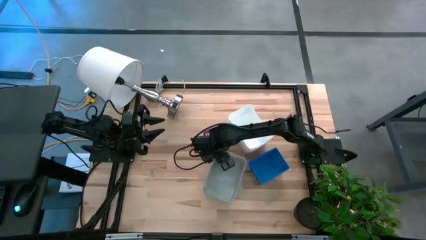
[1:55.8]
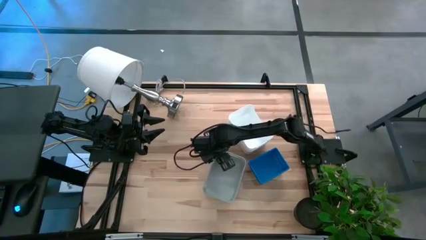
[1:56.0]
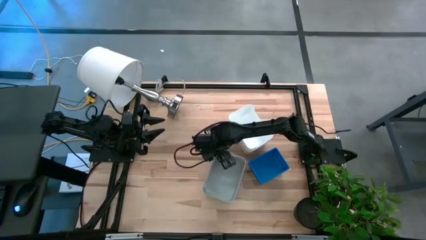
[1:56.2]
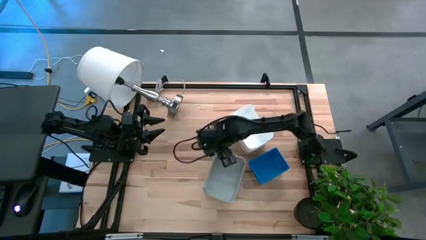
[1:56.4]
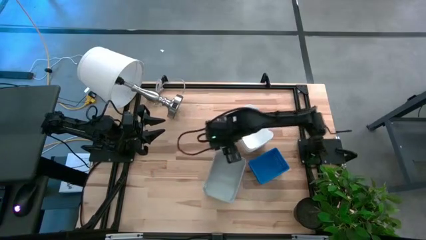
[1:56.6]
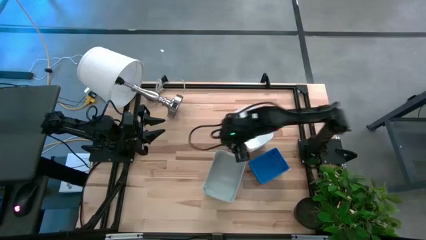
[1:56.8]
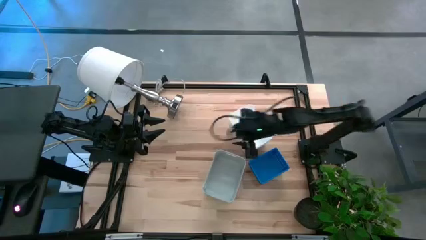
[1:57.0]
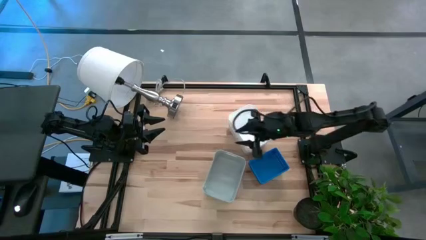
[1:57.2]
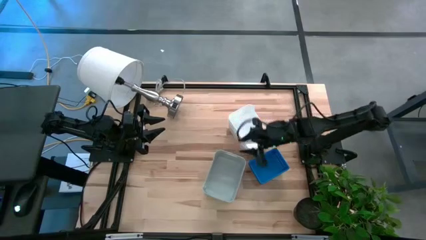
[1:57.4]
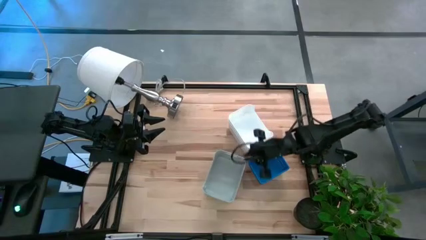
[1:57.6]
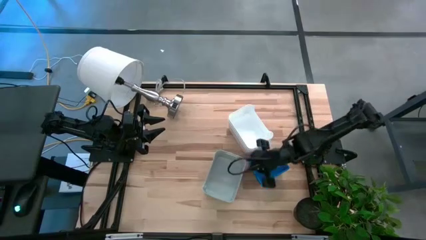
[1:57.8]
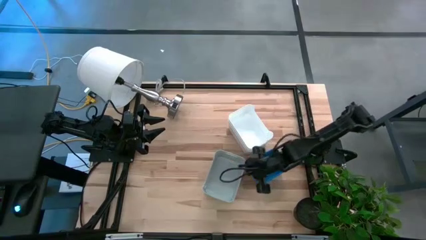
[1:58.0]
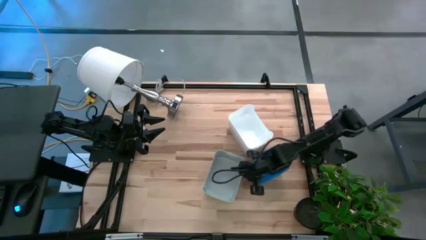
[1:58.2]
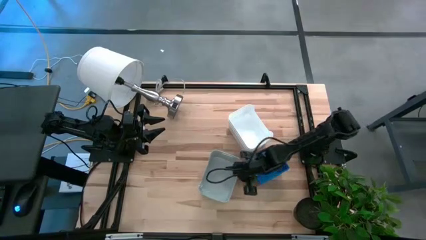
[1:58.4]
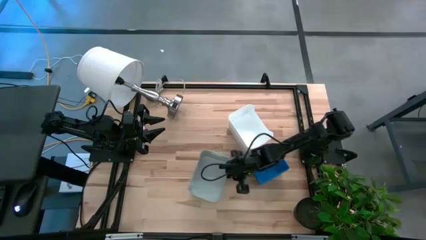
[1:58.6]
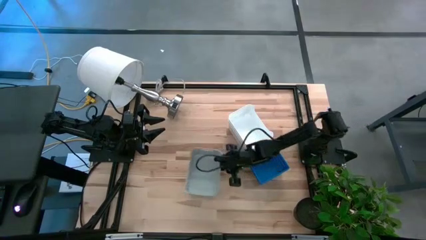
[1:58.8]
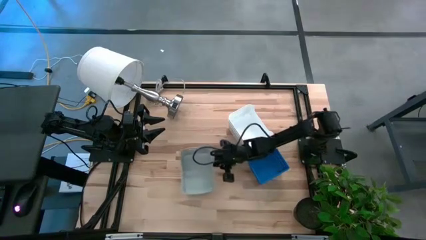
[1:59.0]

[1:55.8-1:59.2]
Adjust the stack of gray bins

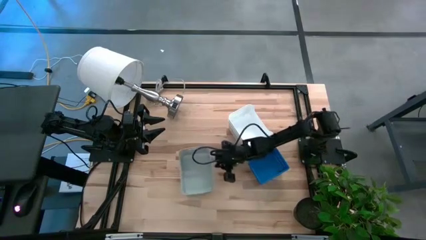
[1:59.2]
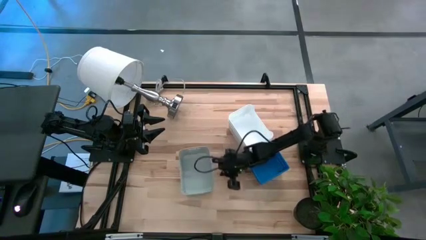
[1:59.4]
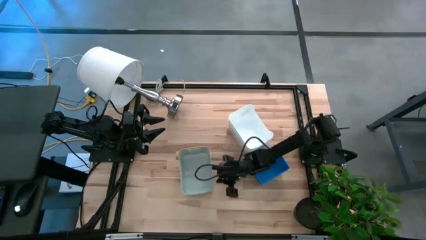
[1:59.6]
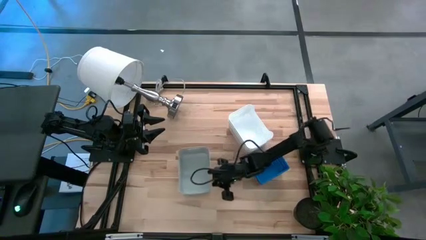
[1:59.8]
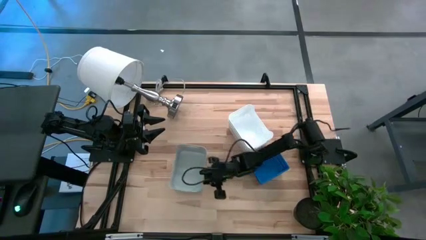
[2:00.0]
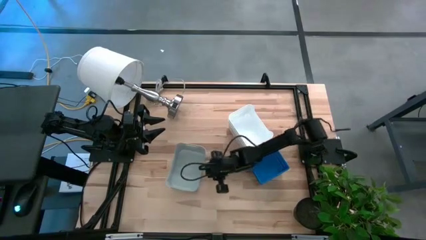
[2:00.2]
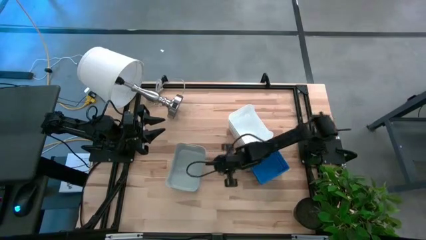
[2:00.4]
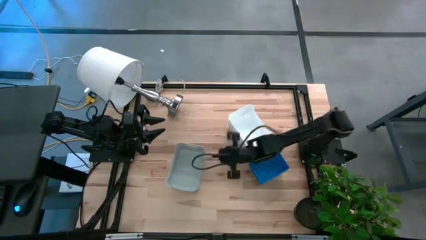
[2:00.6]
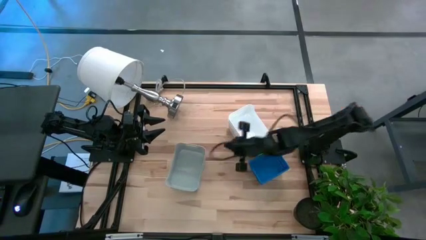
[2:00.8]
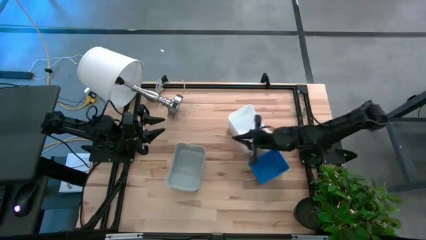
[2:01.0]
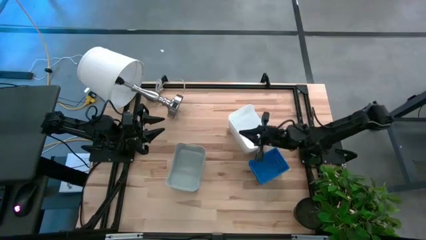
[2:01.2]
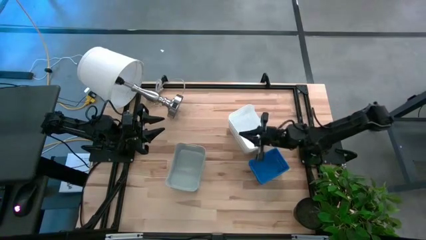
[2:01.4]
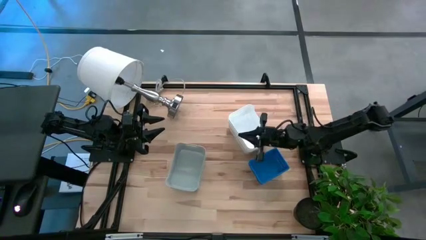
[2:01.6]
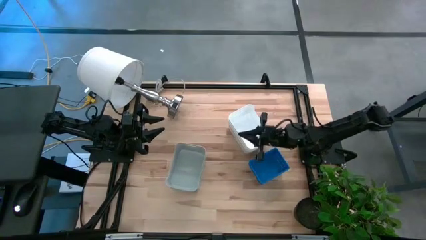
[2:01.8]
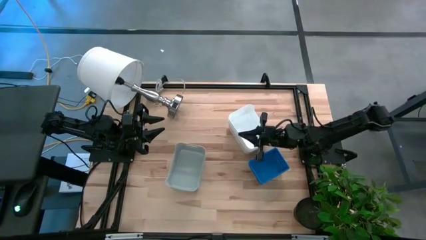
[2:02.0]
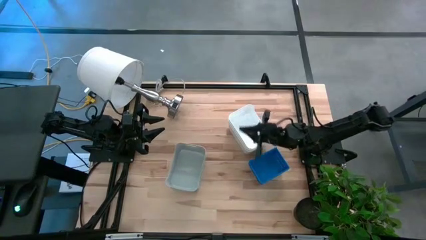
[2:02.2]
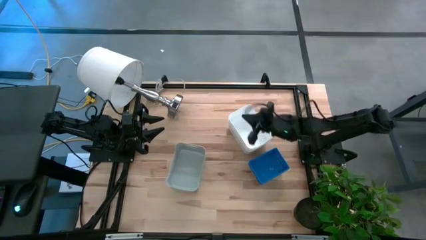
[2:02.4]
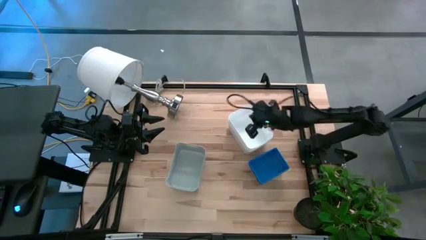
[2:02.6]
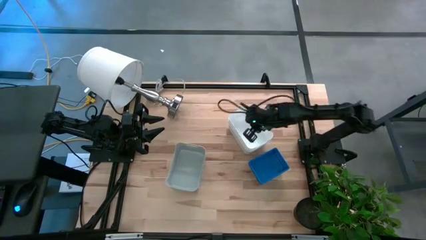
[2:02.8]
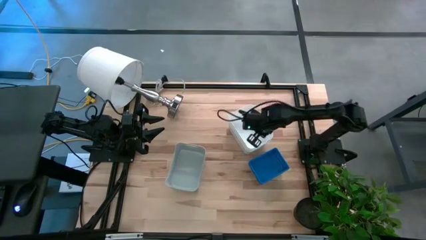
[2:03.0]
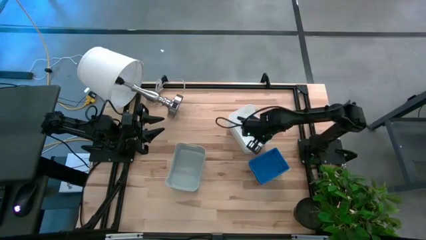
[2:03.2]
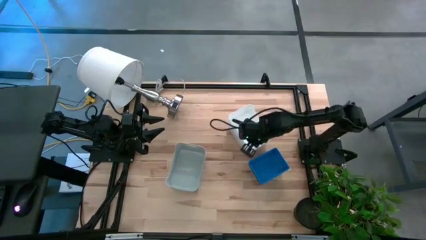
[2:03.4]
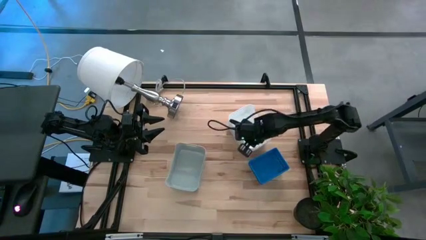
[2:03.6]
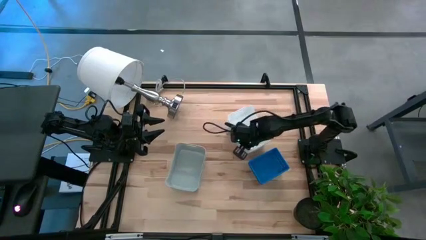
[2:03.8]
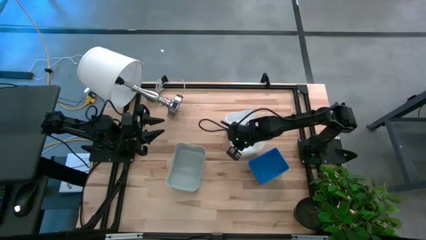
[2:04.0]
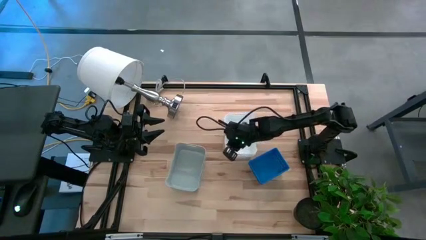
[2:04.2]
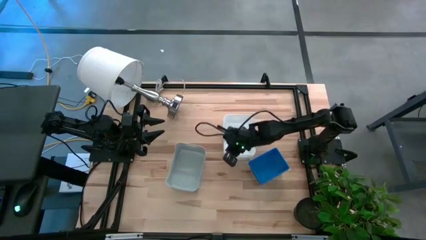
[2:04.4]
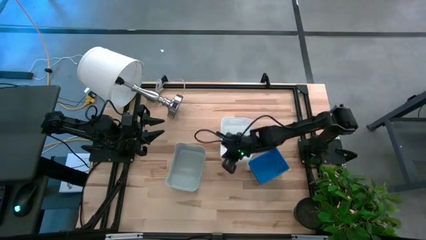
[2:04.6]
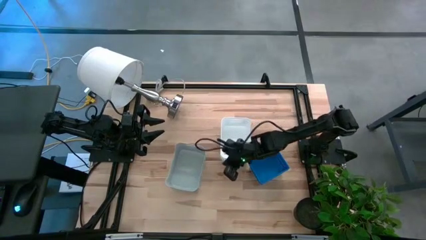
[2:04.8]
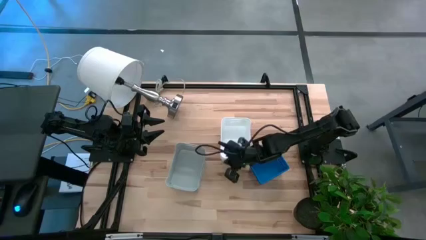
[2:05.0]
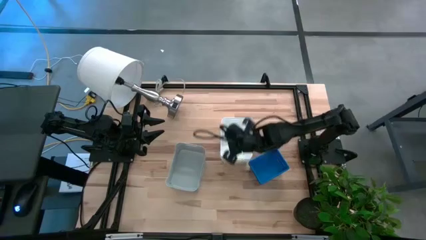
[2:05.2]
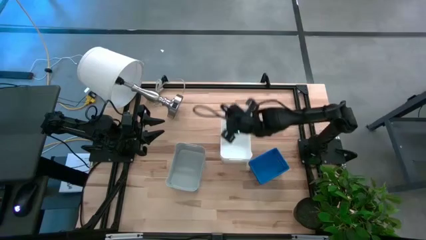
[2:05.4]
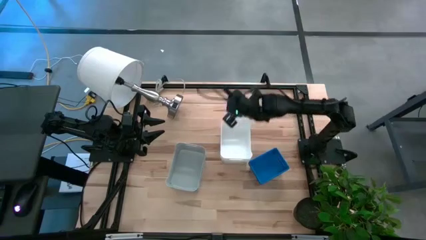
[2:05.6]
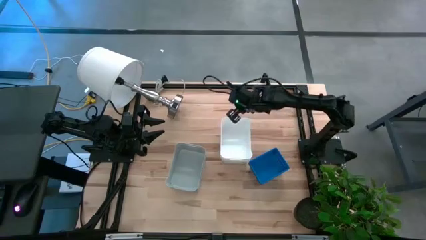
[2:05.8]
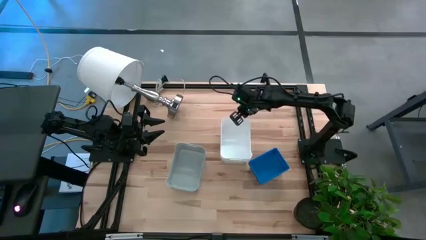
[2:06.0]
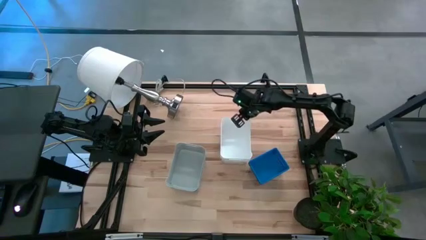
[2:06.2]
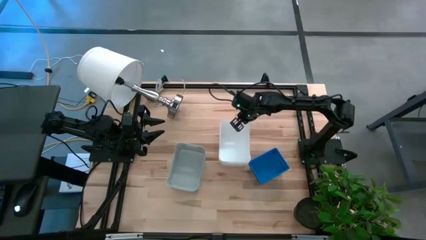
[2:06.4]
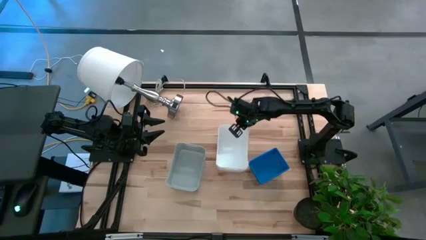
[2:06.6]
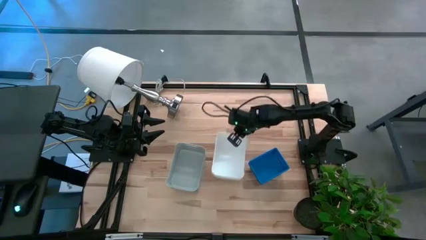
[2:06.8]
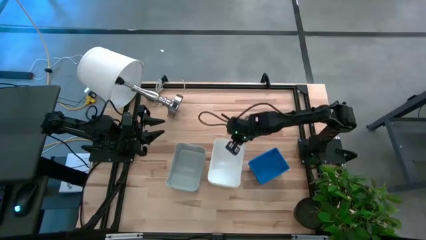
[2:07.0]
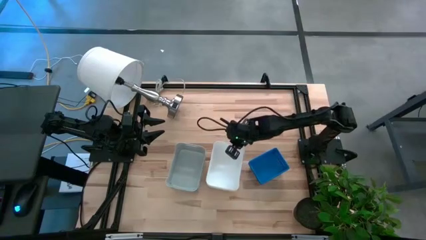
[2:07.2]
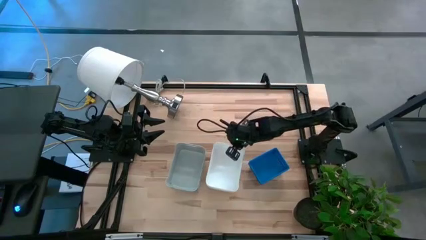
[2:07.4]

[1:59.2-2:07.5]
Adjust the stack of white bins

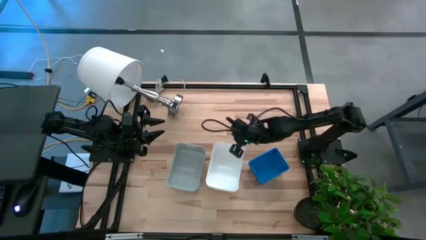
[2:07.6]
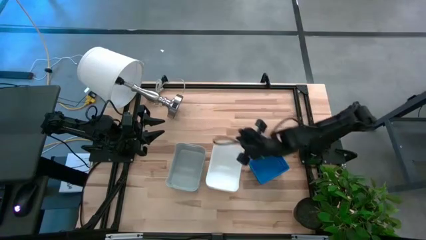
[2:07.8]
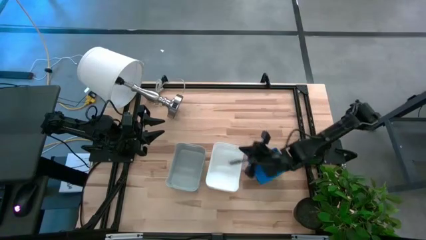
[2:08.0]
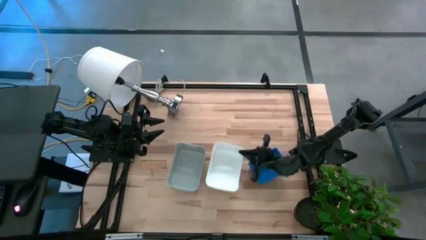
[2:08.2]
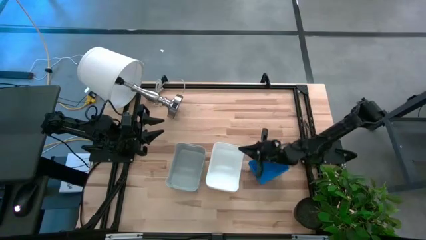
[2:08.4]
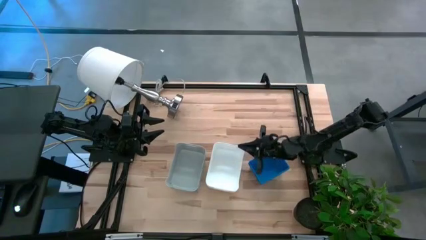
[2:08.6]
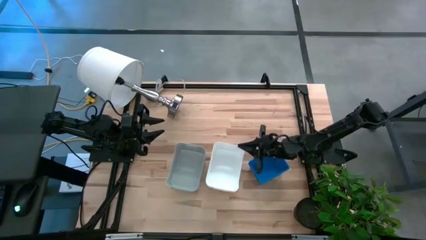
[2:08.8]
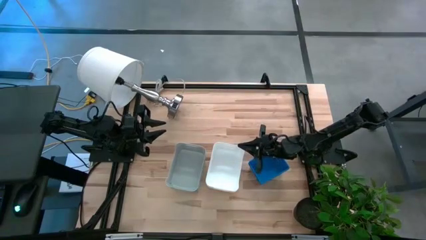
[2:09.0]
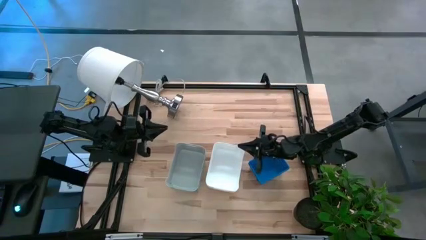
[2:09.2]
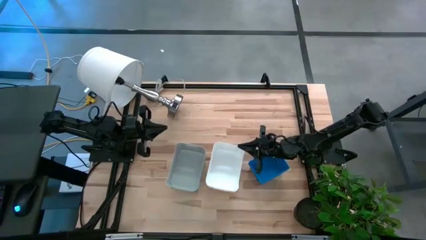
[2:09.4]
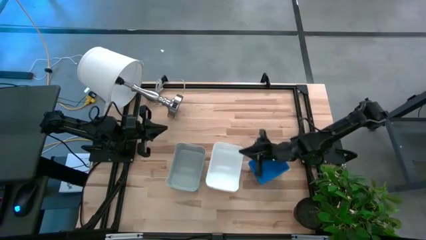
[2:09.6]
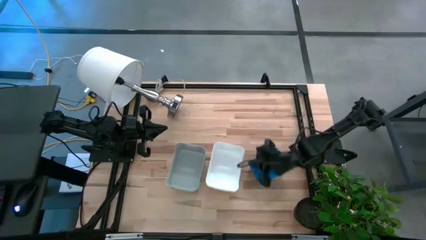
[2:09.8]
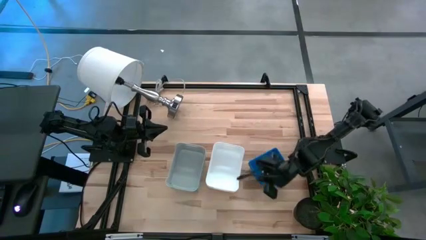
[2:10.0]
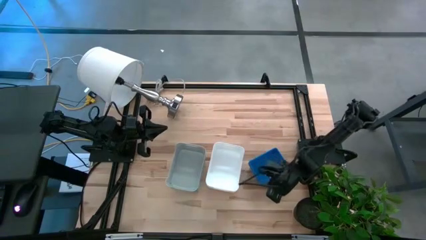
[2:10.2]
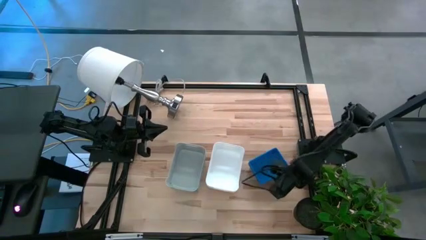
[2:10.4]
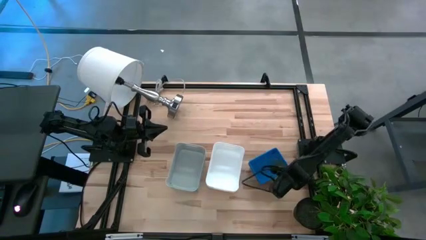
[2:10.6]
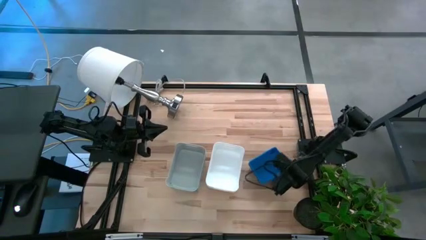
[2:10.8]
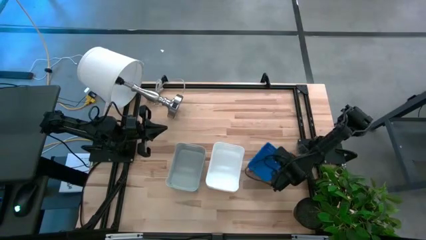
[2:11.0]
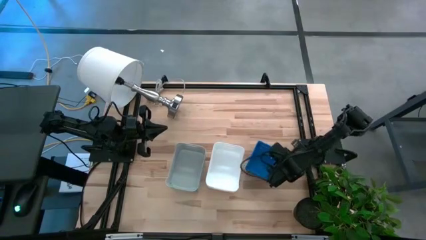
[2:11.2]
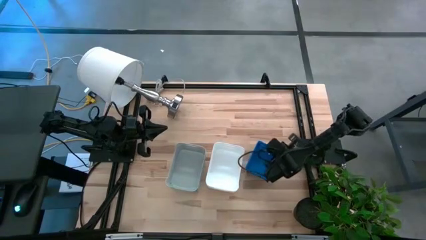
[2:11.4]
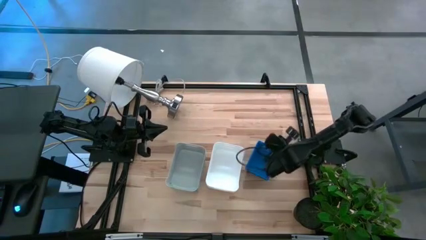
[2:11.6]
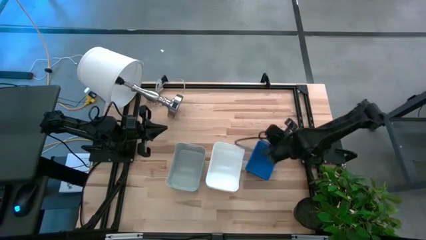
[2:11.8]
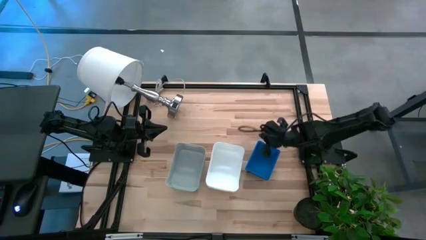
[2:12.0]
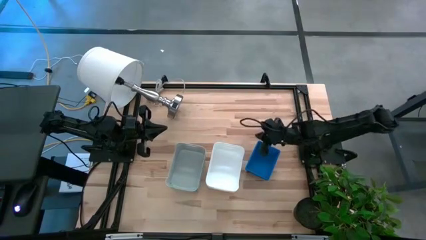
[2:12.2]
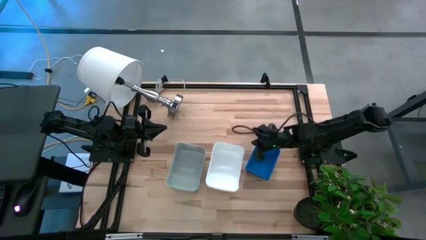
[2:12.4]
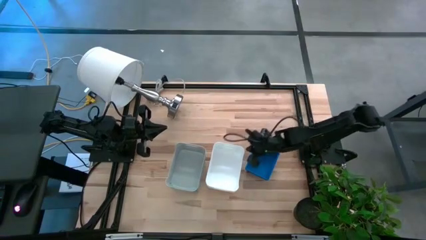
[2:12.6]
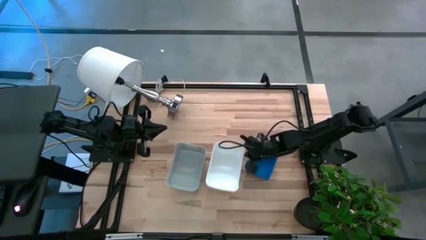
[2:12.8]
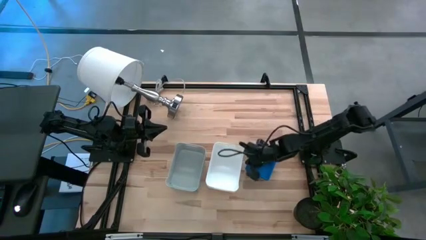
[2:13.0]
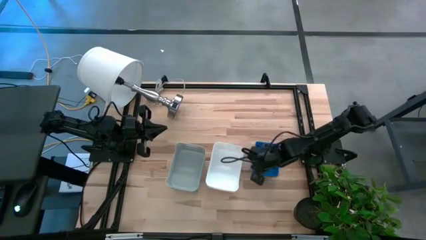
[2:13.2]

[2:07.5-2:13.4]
Adjust the stack of blue bins
